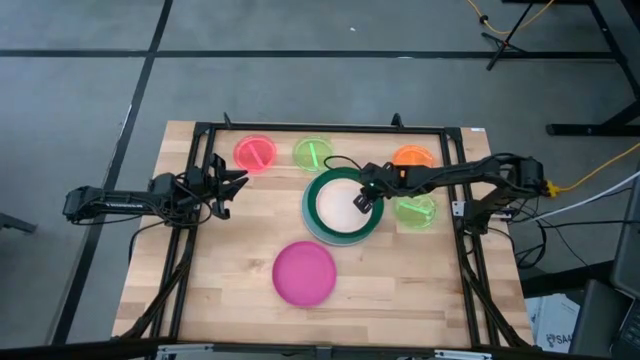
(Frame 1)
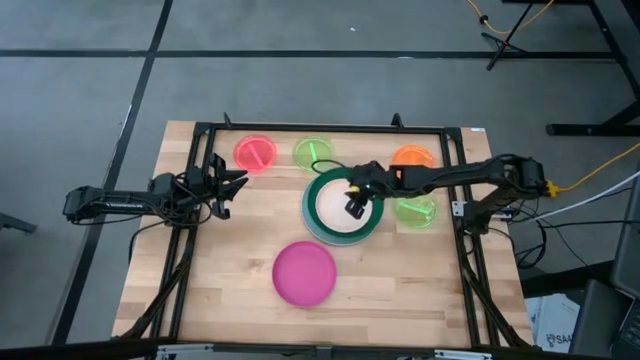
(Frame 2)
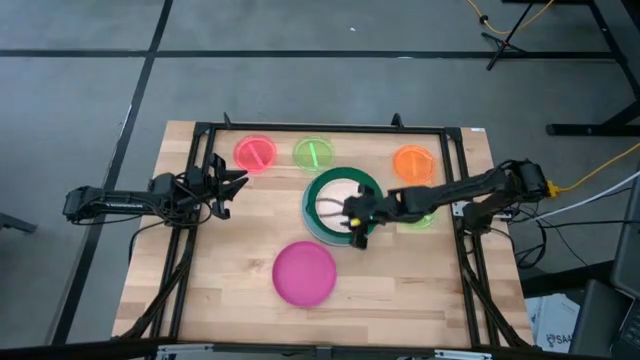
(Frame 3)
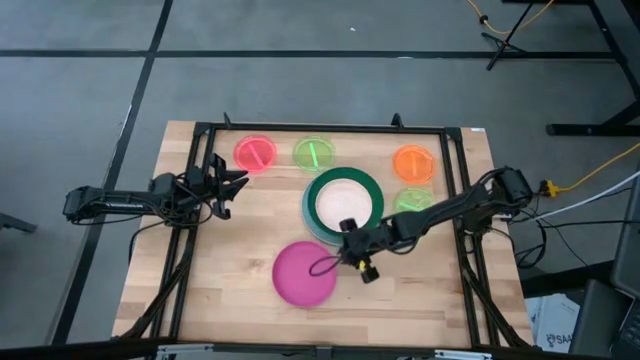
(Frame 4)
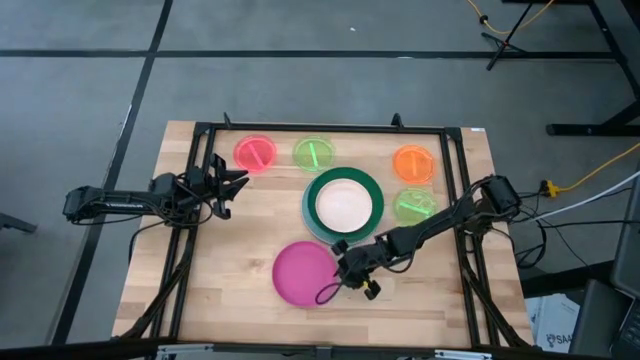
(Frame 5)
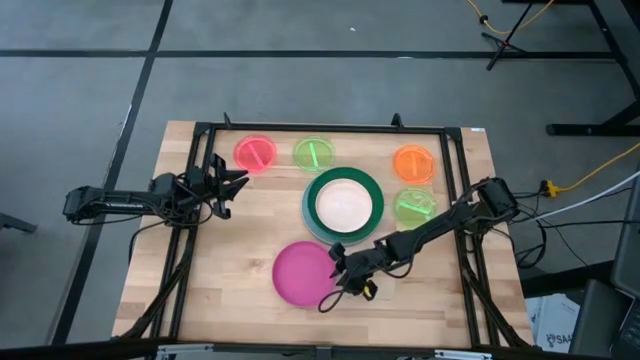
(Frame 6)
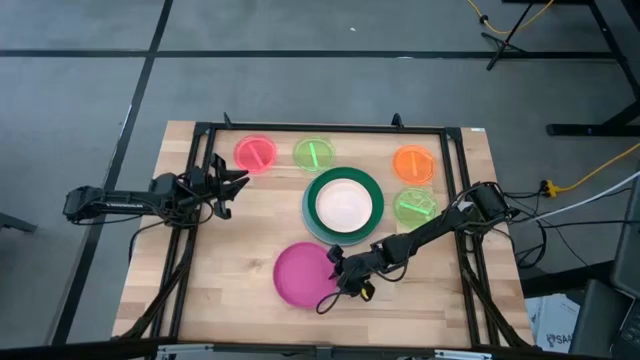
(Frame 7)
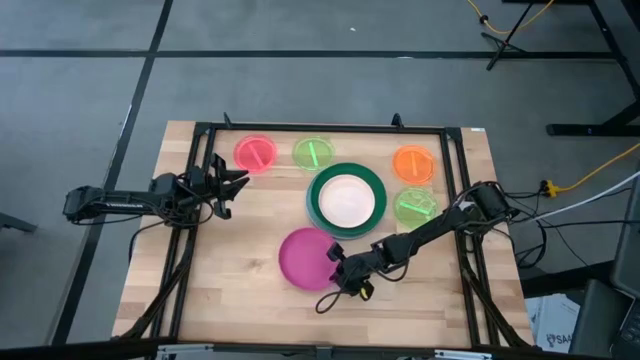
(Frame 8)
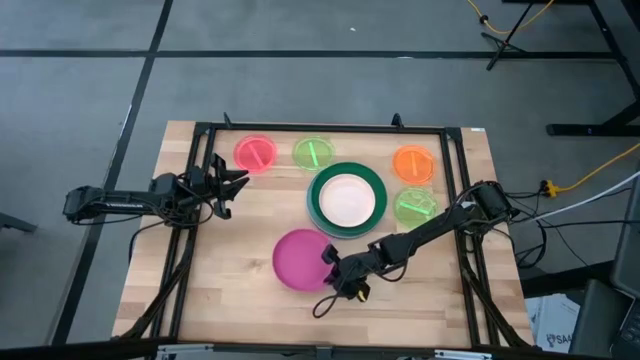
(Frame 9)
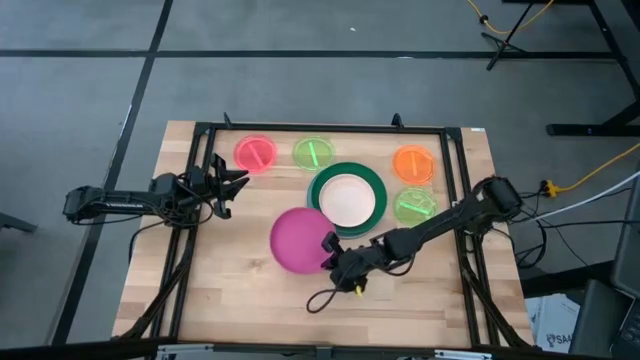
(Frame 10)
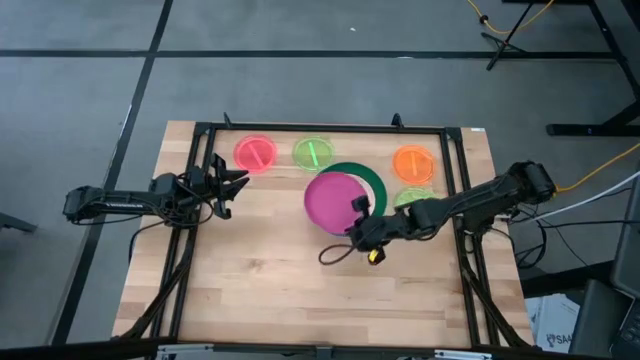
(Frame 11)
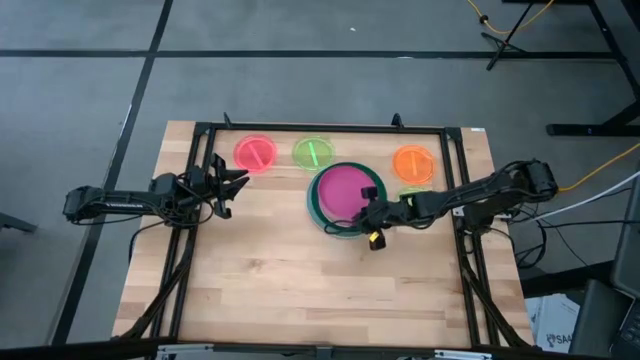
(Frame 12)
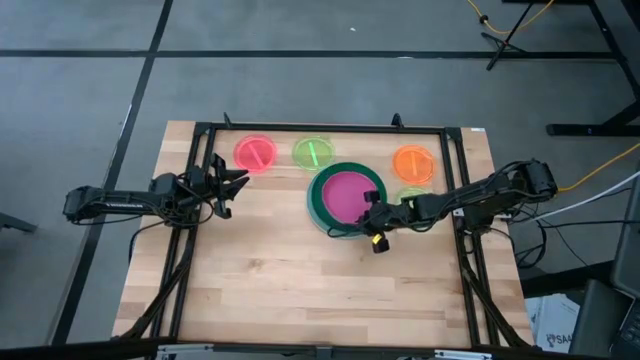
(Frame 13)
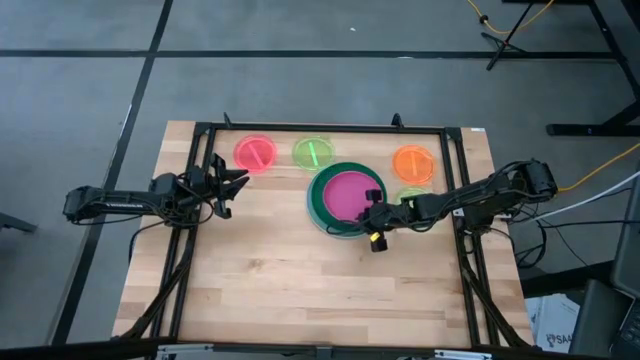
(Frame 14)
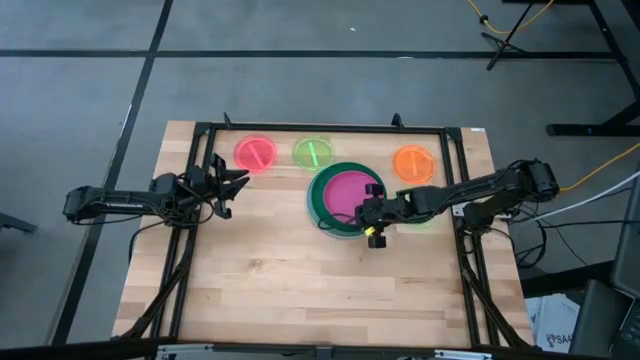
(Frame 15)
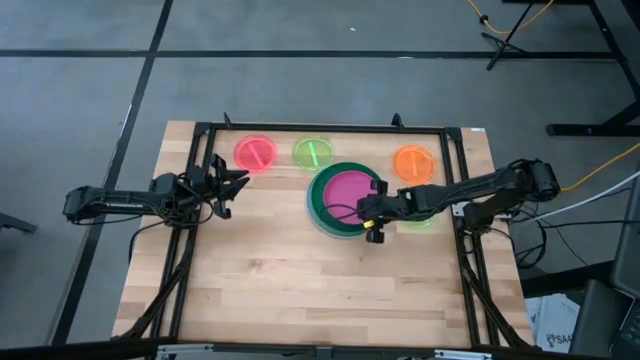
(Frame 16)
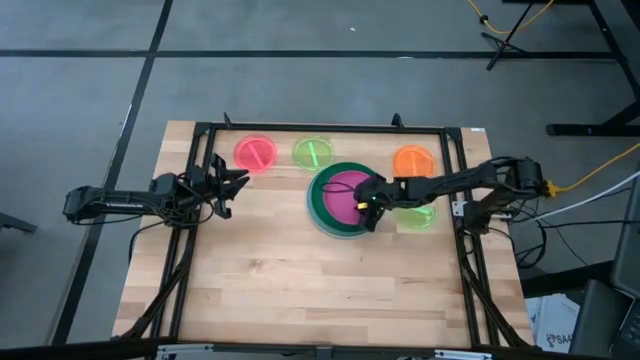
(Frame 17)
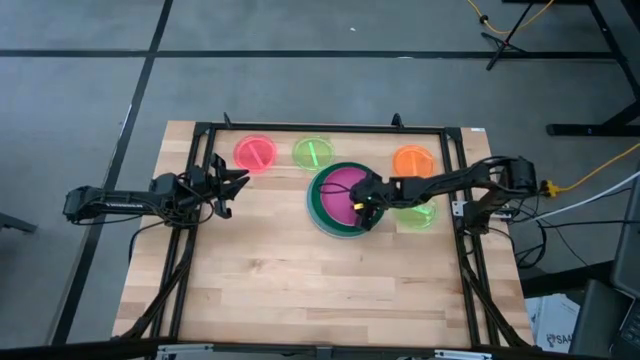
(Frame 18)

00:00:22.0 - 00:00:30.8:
Task: Stack plastic plates
Stack the pink plate on the light orange plate

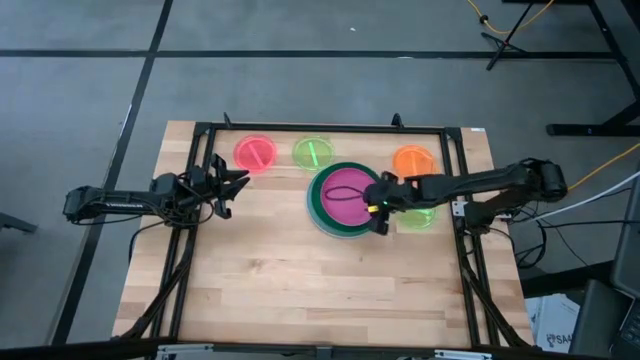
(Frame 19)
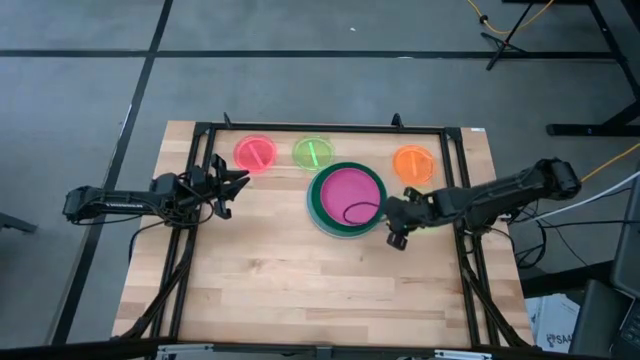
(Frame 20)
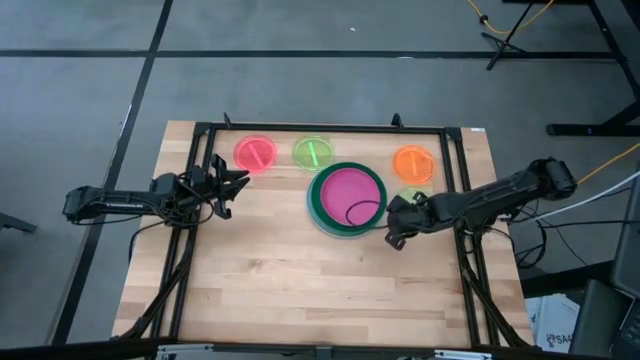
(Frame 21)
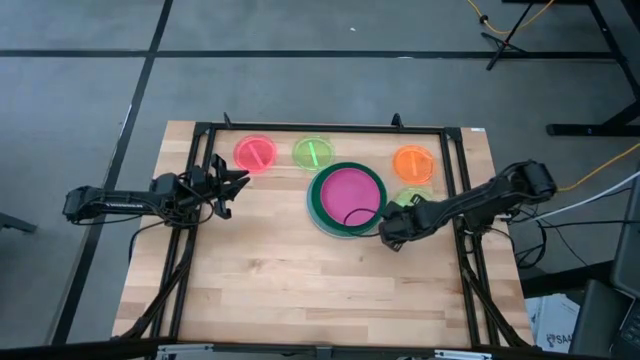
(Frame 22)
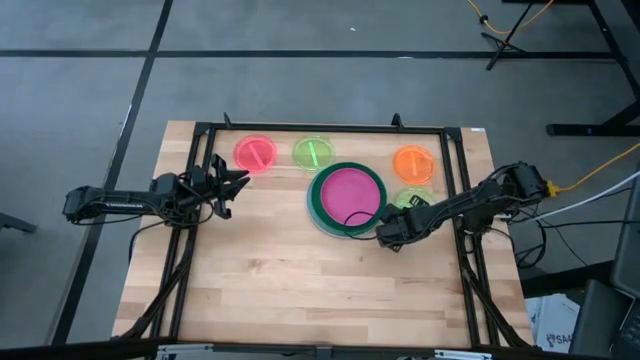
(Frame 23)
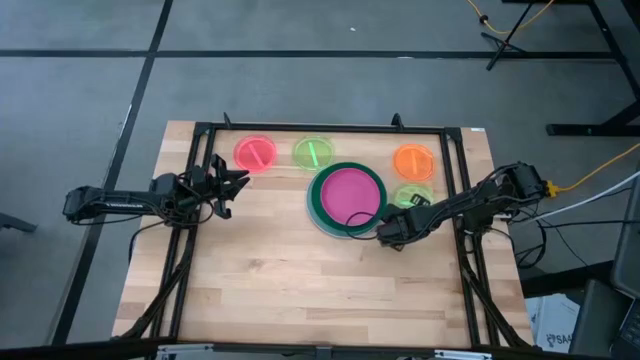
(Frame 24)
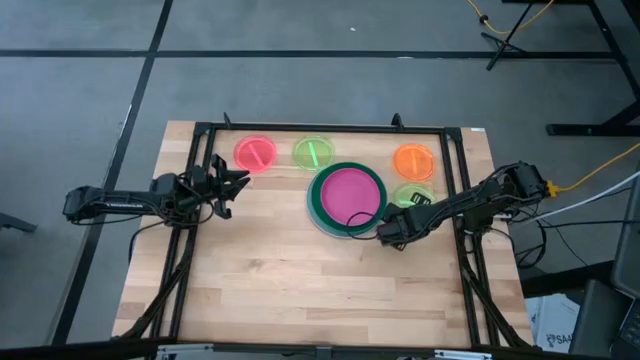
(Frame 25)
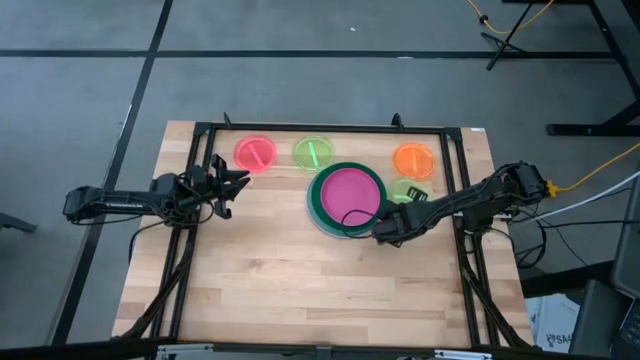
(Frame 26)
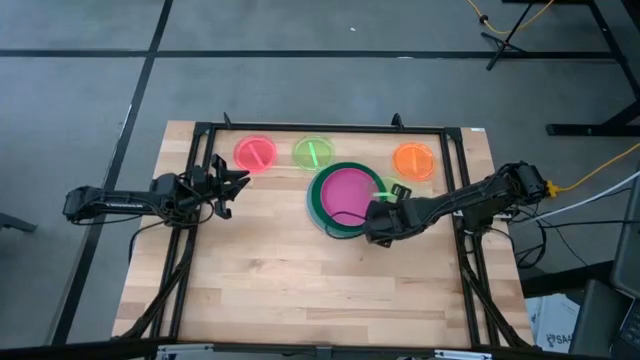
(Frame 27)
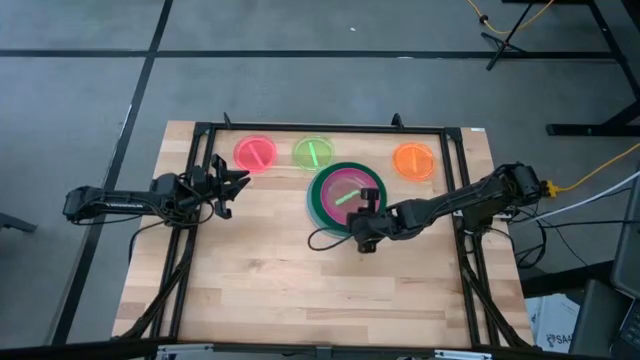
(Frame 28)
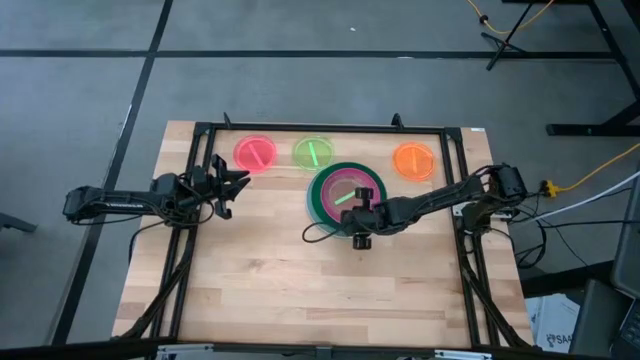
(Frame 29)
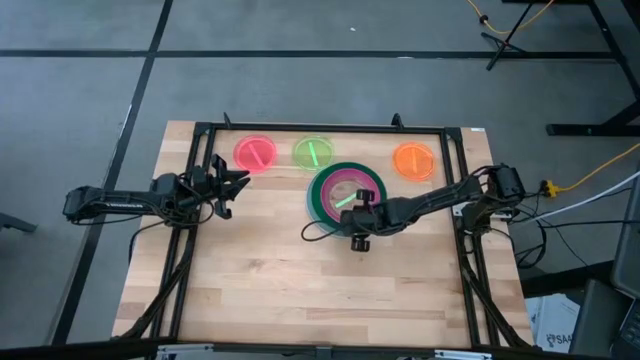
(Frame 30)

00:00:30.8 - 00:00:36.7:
Stack the right light green plate on the pink plate

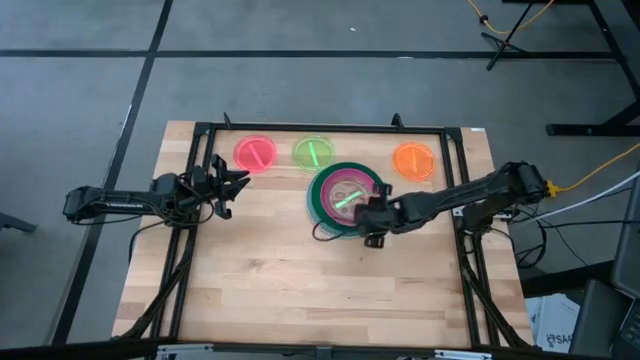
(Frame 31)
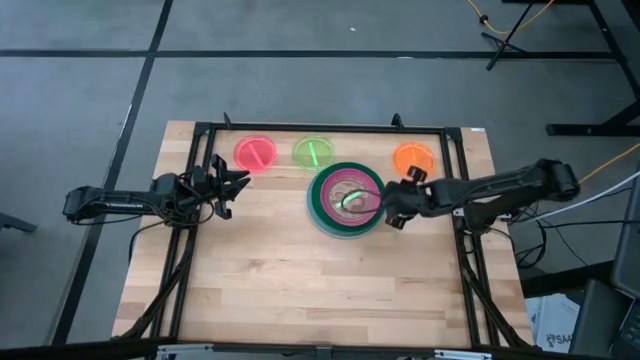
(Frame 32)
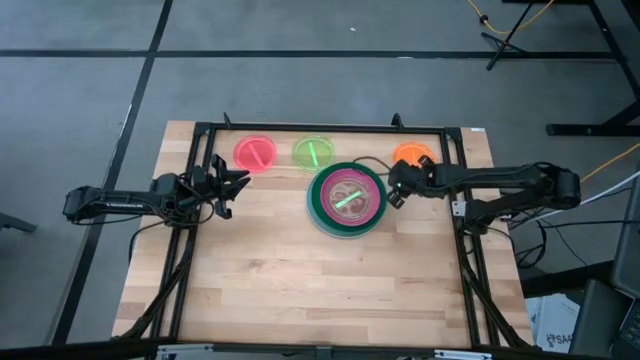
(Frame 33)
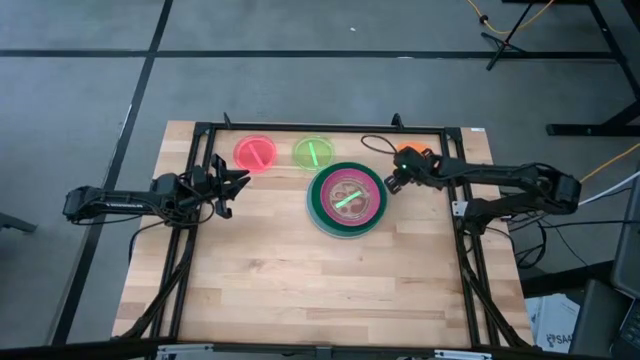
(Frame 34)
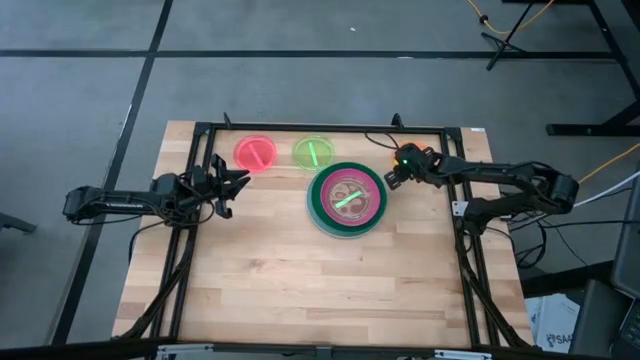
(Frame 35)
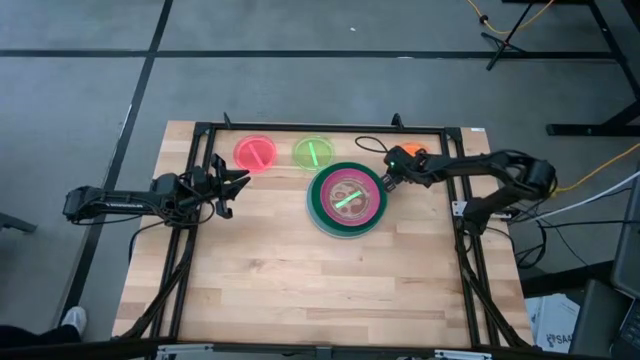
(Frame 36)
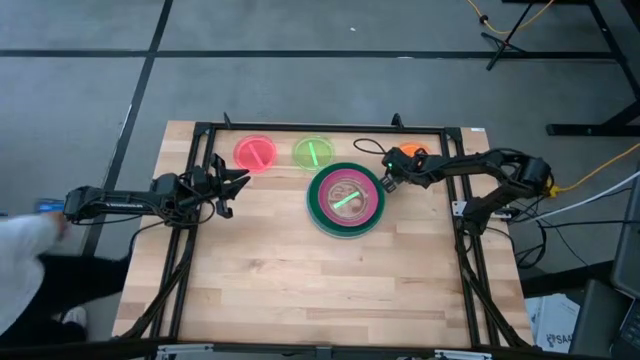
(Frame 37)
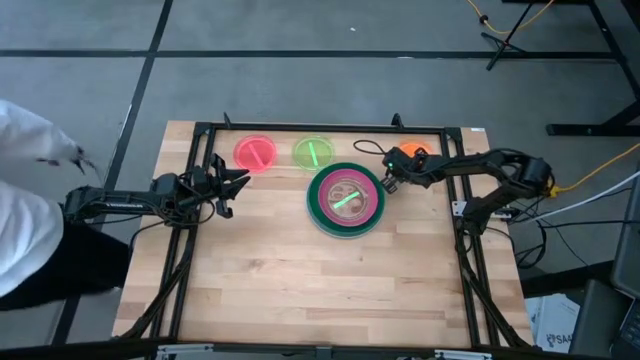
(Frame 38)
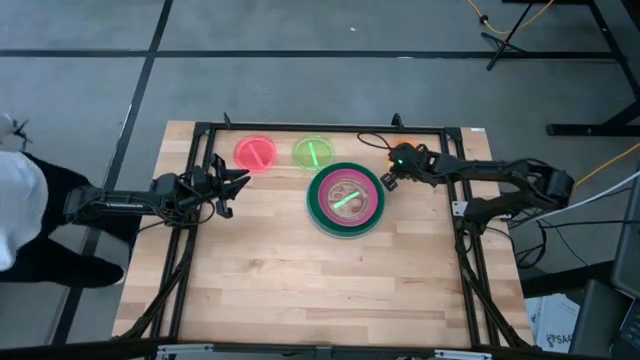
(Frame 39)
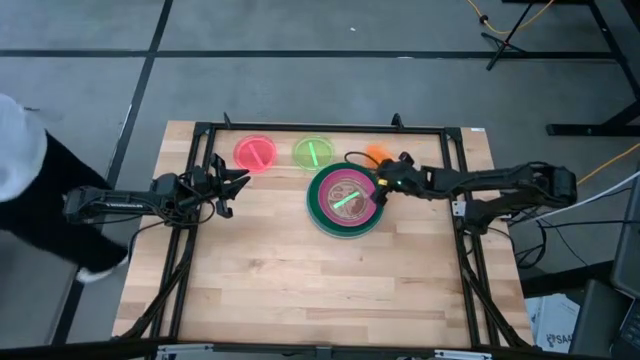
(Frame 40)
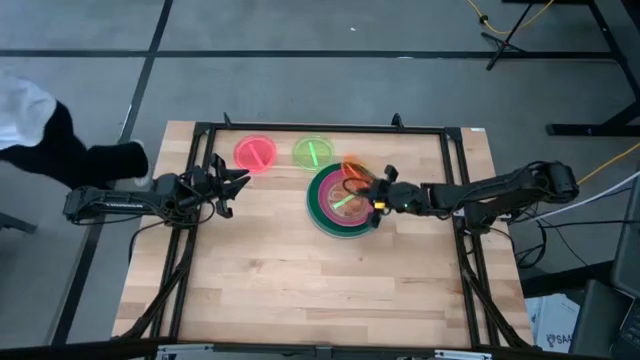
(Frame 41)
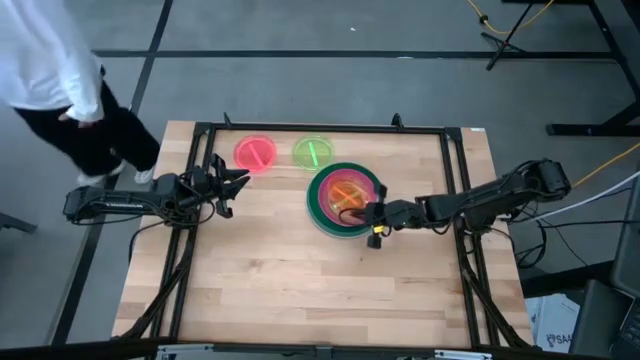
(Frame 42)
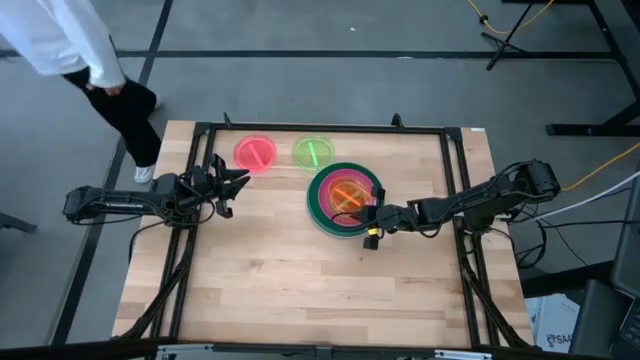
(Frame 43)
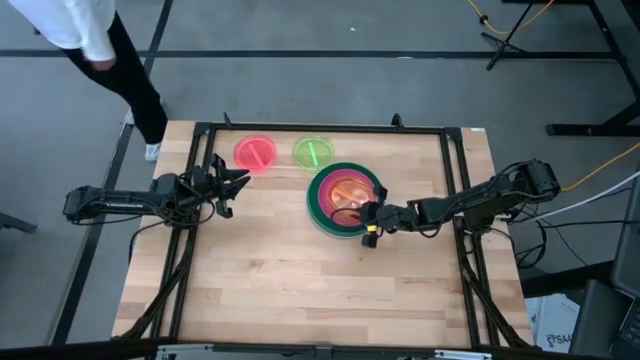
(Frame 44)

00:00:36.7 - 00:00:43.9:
Stack the orange plate on the light green plate
